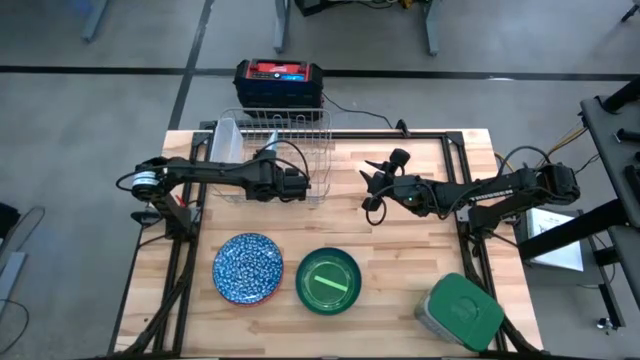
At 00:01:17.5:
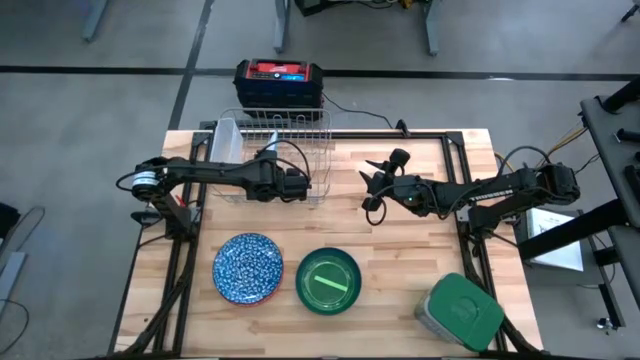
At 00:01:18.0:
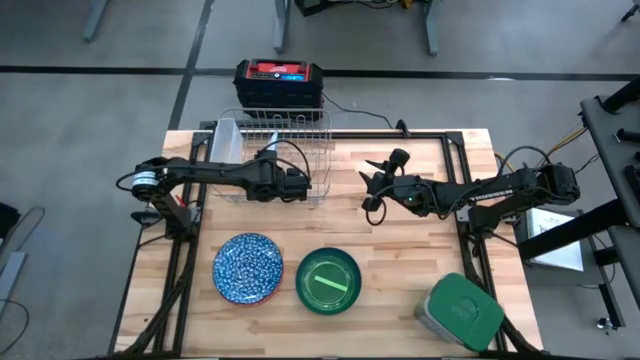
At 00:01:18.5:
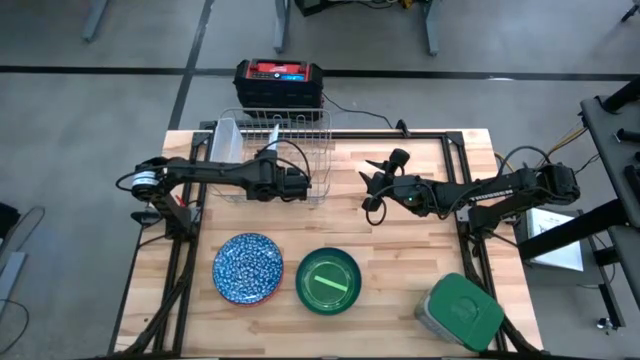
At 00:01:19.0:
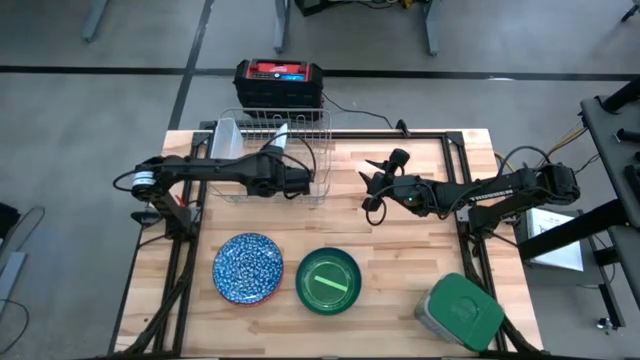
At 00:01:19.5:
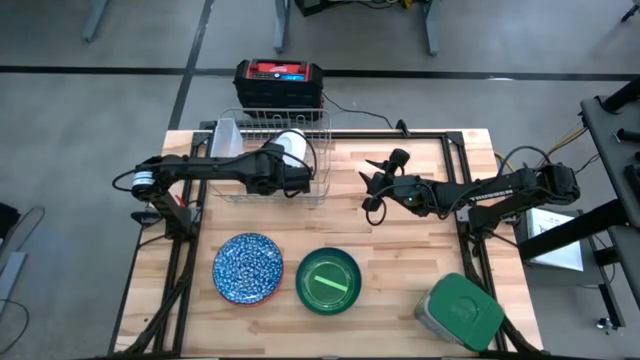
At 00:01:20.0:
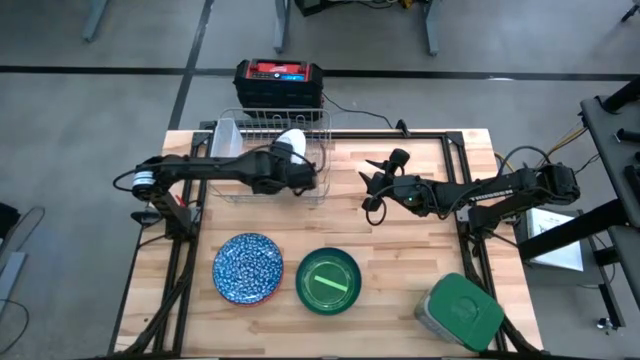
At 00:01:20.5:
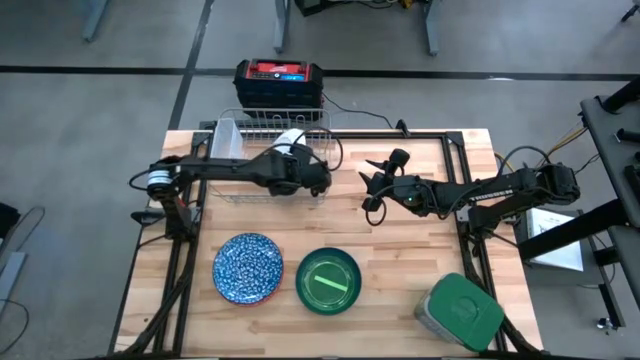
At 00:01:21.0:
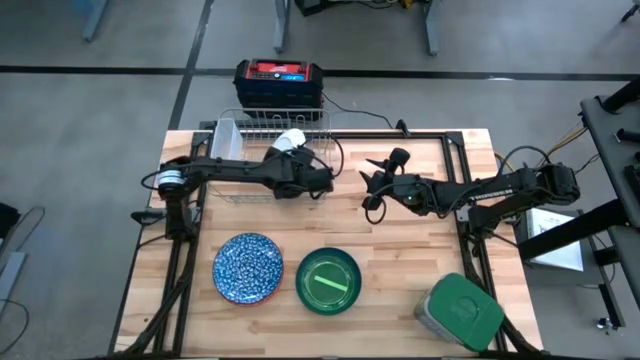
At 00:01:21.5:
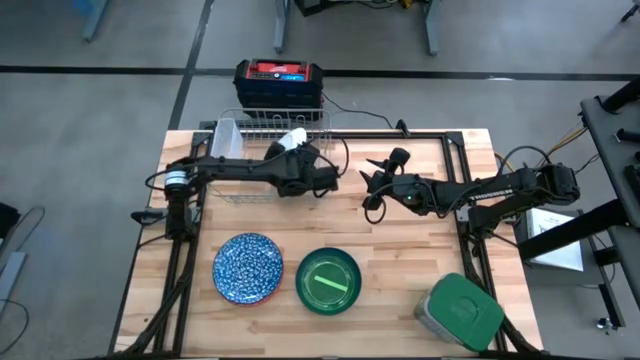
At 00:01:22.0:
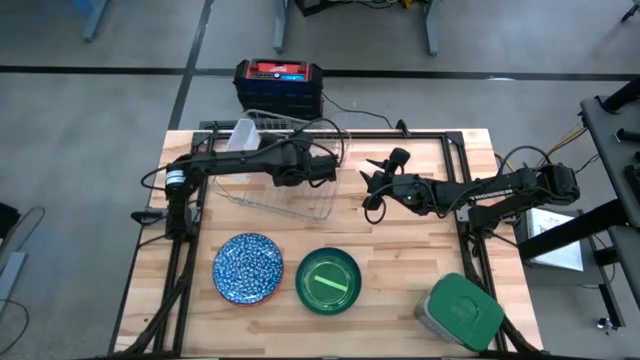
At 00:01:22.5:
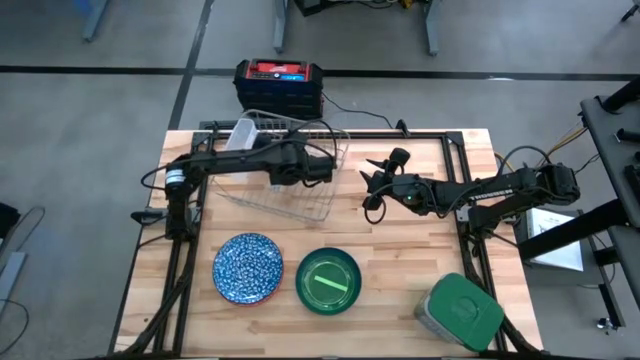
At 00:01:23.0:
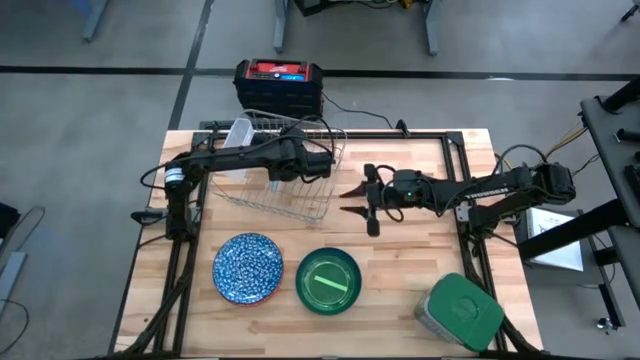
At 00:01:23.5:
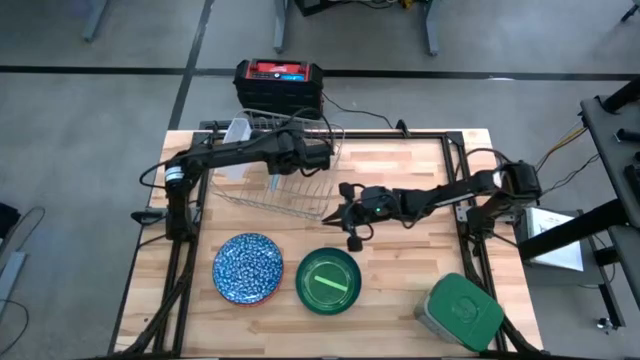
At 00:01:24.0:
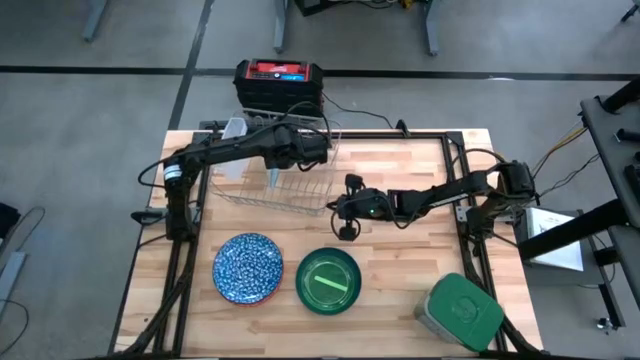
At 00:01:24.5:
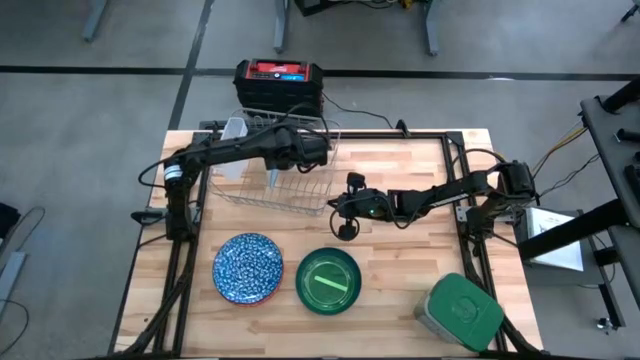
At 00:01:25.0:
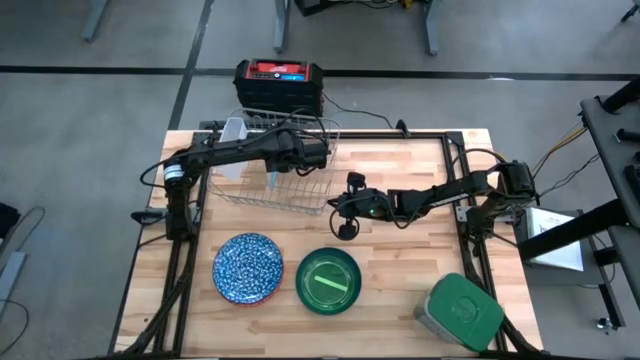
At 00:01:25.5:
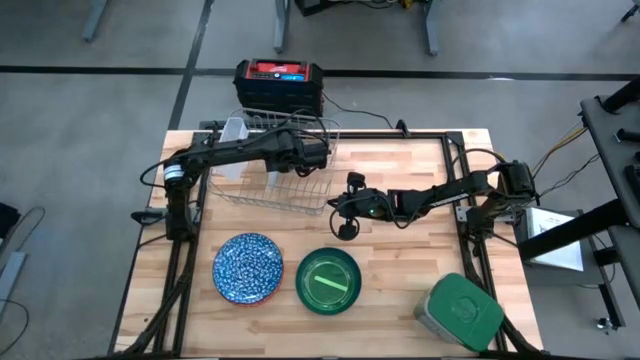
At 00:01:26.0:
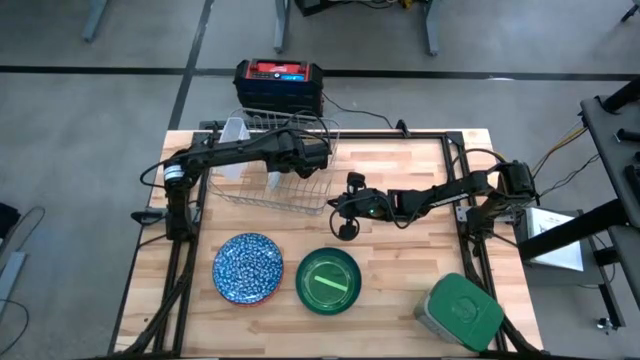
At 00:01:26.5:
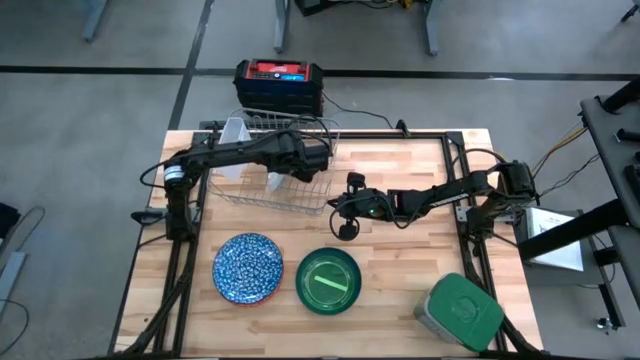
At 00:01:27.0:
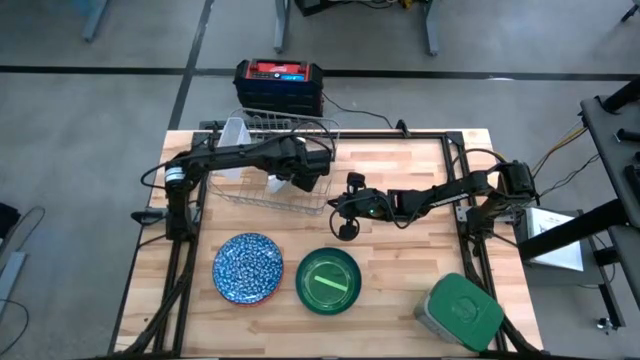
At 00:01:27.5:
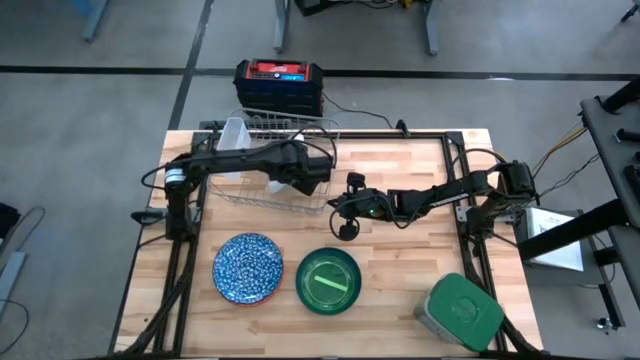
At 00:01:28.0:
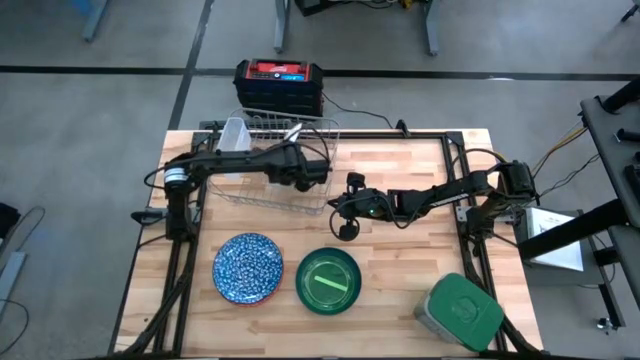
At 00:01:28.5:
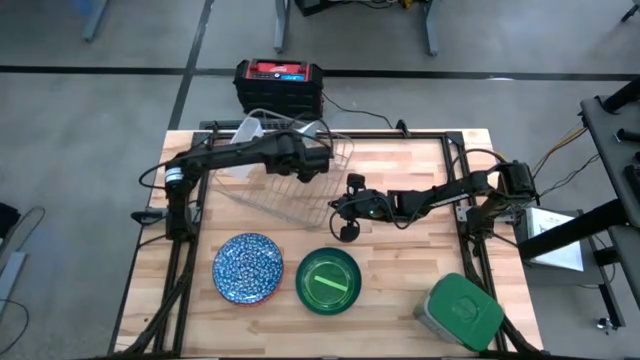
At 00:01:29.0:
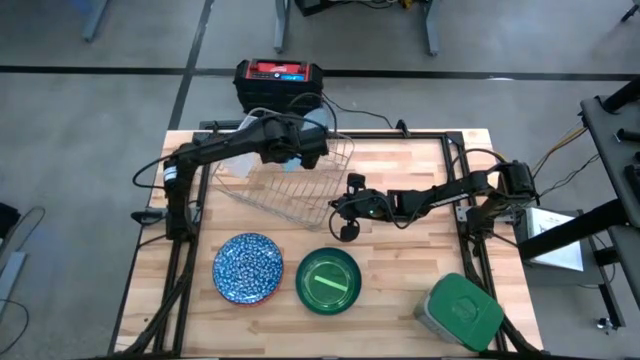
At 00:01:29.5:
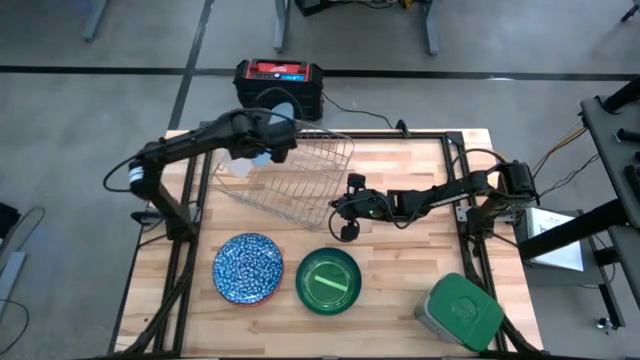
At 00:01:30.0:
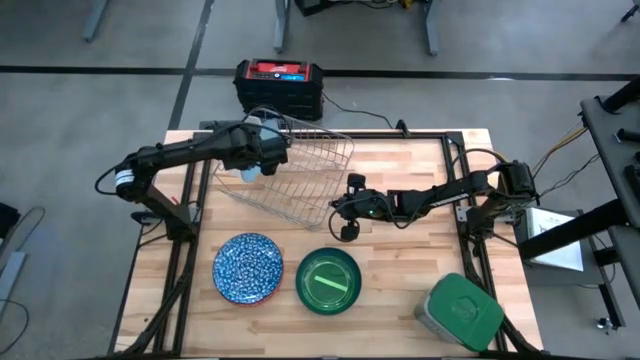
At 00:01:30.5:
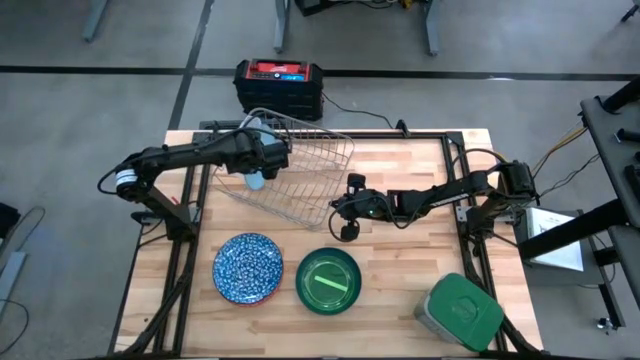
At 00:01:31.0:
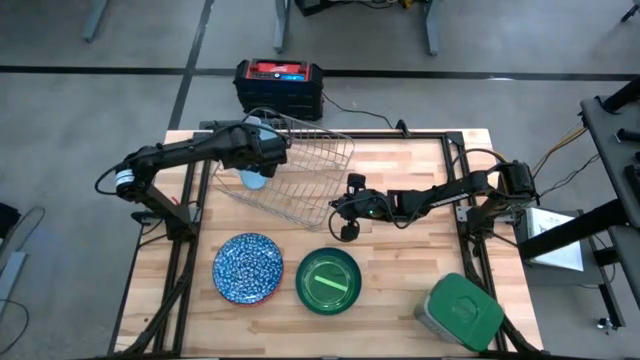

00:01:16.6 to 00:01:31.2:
Task: Sort dishes
Put the light blue patterned plate into the dish rack

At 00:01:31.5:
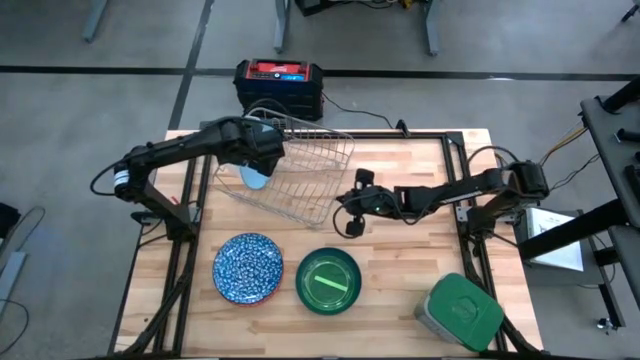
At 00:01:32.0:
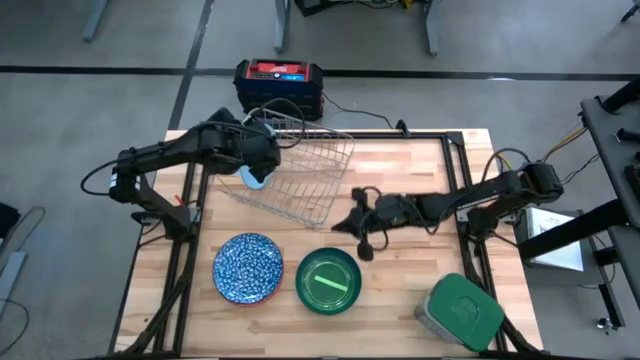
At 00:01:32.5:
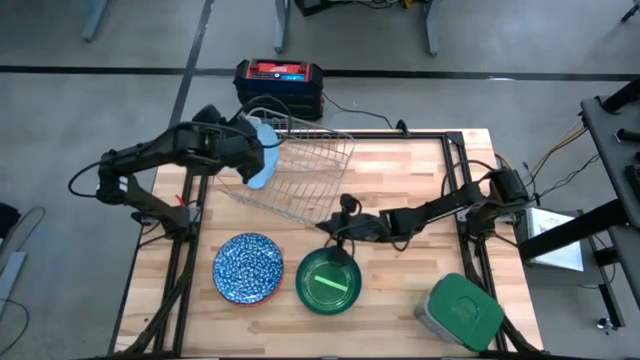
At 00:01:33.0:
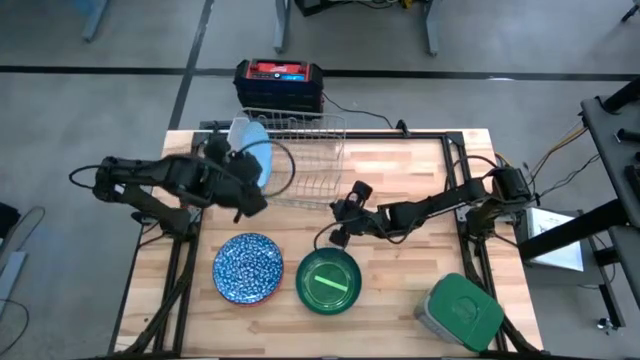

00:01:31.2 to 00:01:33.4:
Adjust the dish rack

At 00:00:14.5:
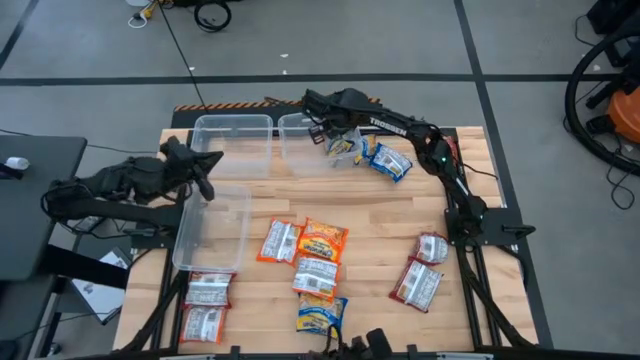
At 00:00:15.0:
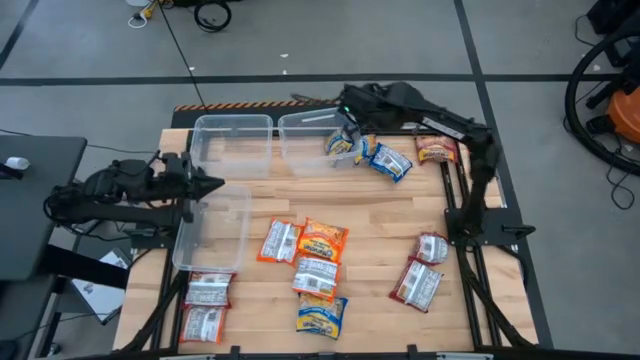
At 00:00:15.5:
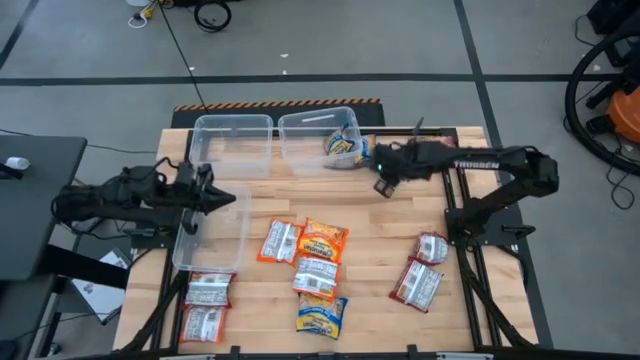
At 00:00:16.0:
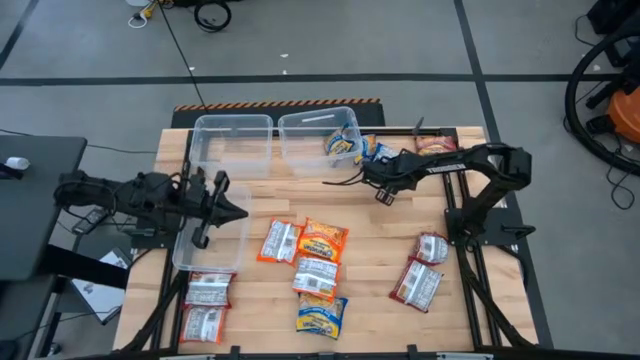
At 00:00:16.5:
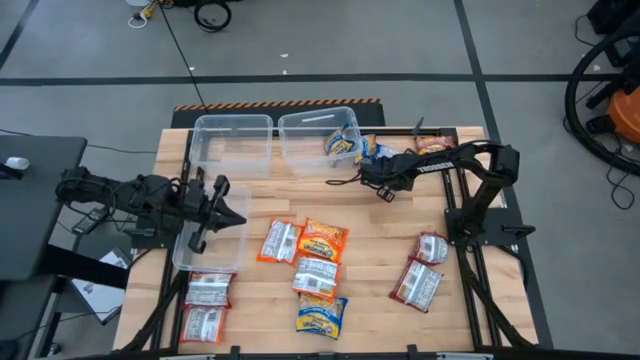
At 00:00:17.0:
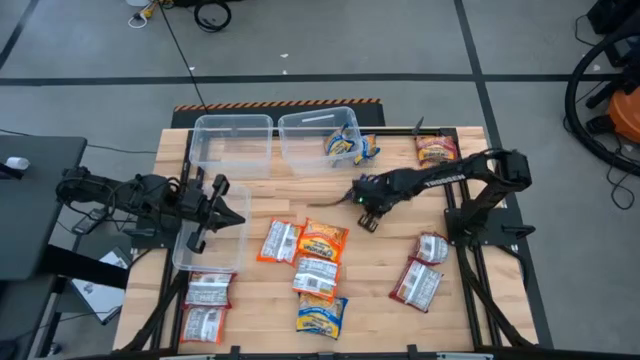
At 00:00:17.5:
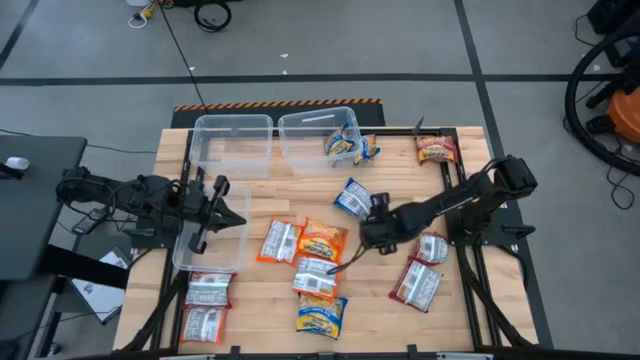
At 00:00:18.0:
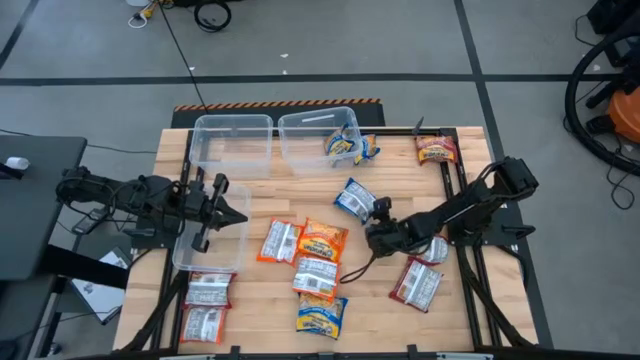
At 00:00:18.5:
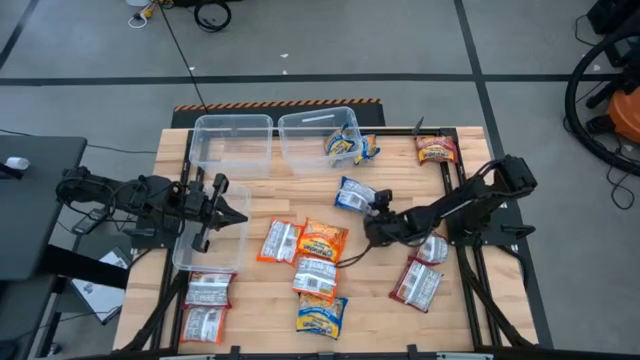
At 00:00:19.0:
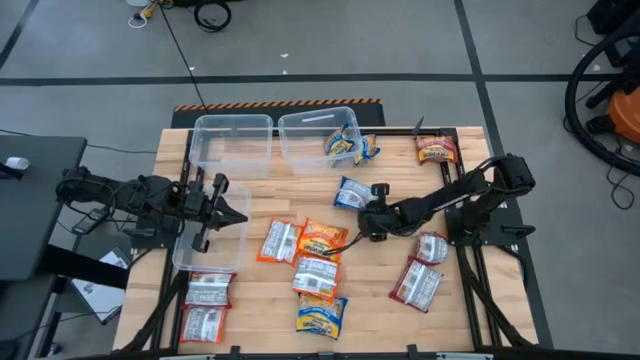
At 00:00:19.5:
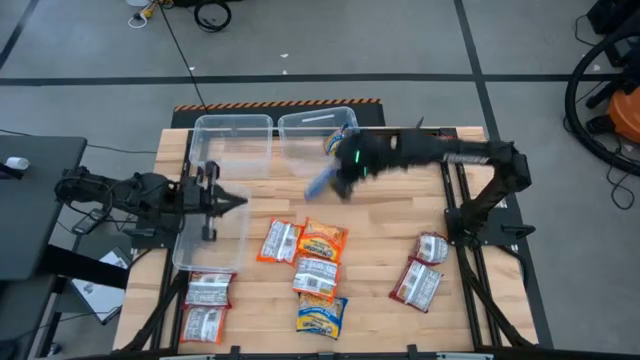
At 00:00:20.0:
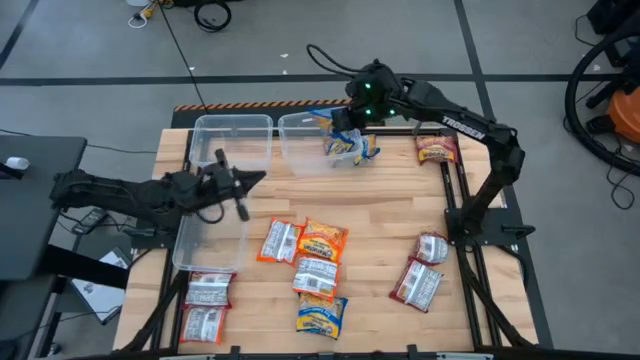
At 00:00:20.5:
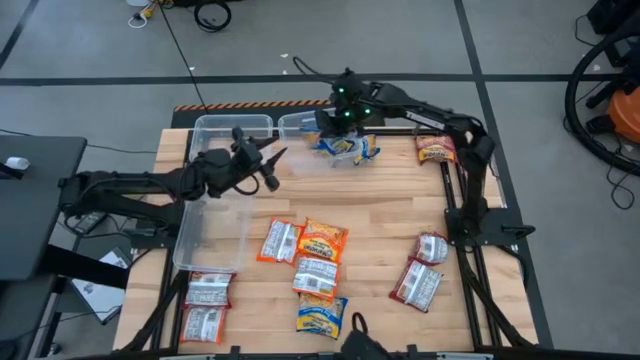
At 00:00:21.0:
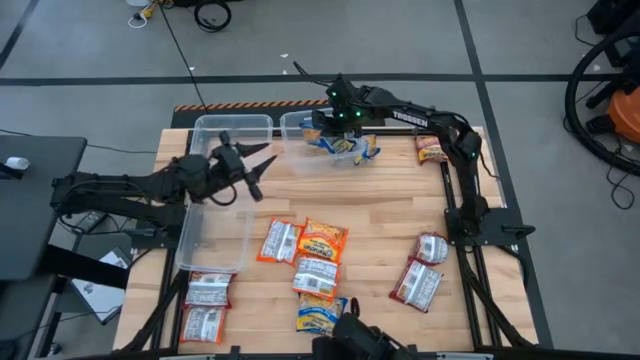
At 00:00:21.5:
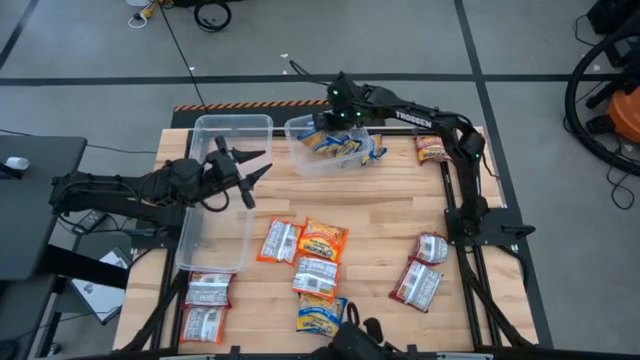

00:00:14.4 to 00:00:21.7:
Task: Sort Maruchan noodles
Put the top right blue noodle pack into the top right transparent bin
